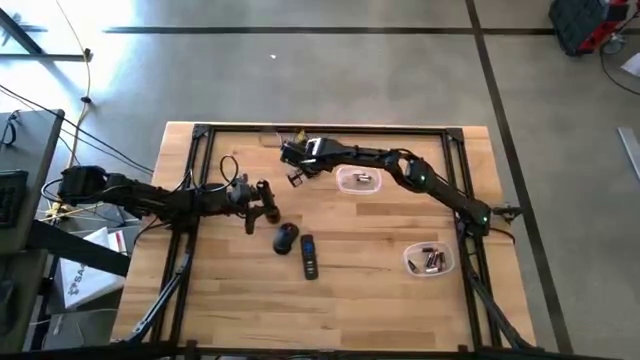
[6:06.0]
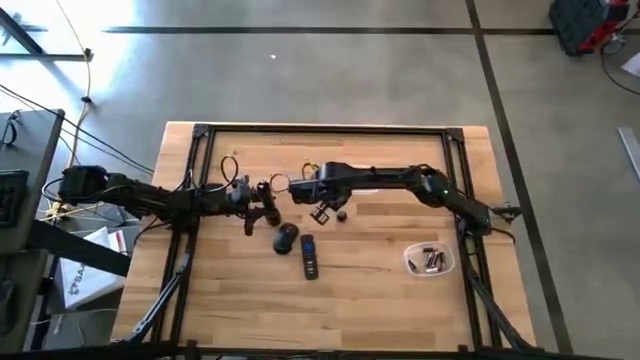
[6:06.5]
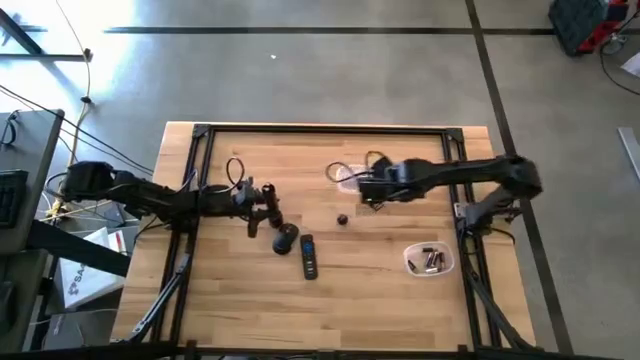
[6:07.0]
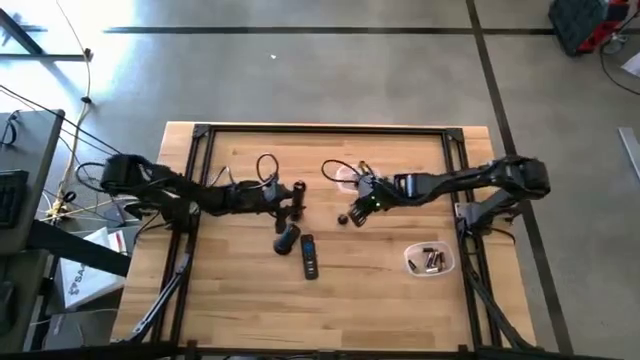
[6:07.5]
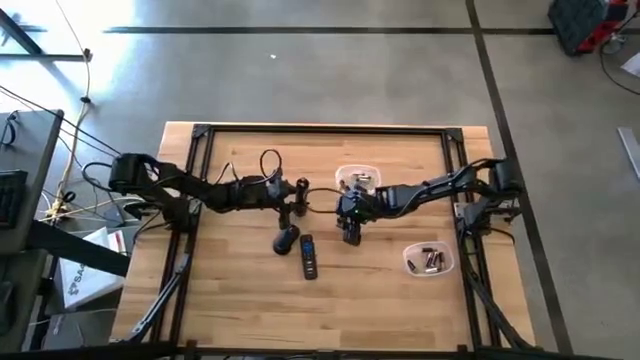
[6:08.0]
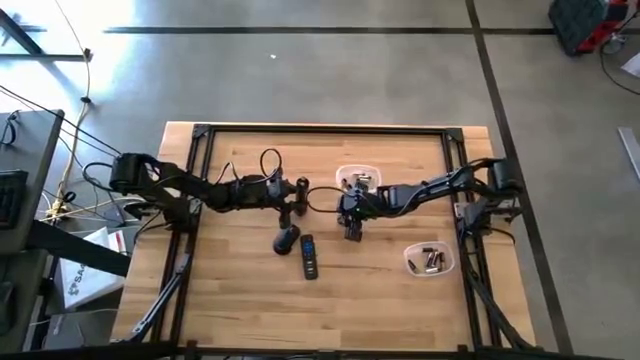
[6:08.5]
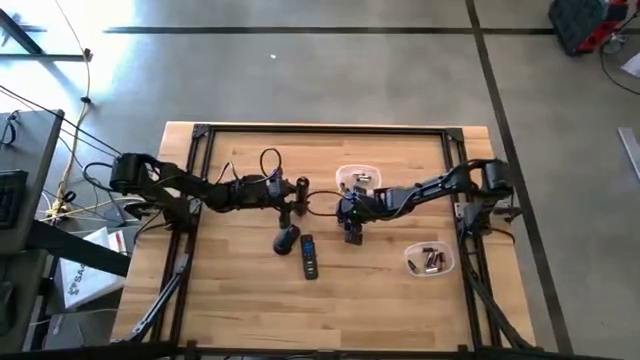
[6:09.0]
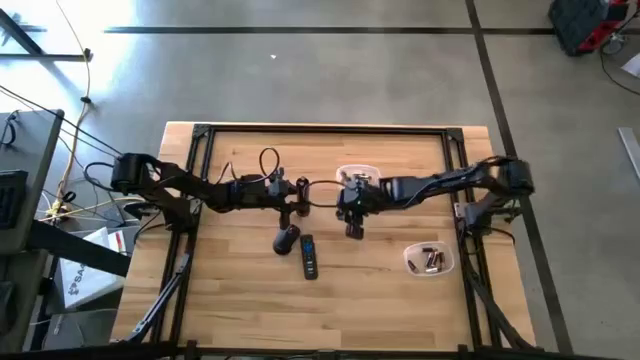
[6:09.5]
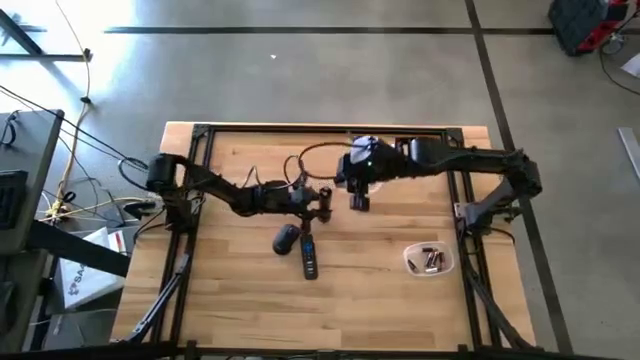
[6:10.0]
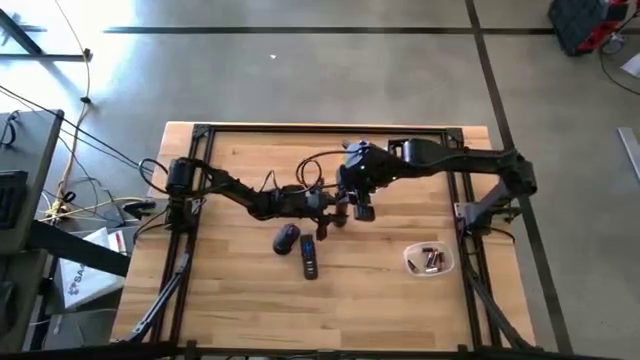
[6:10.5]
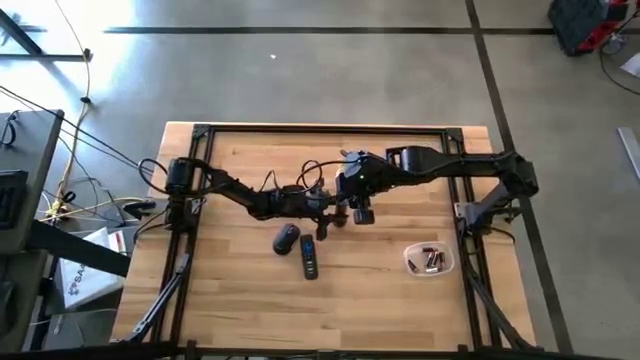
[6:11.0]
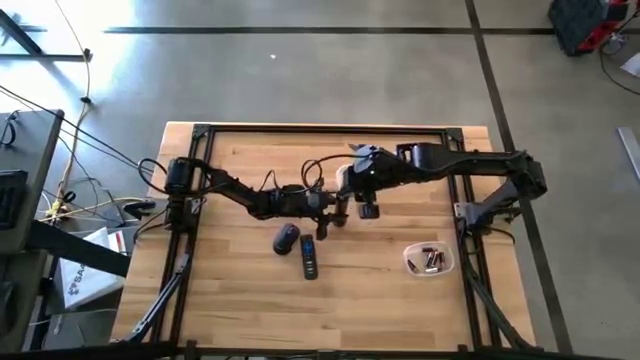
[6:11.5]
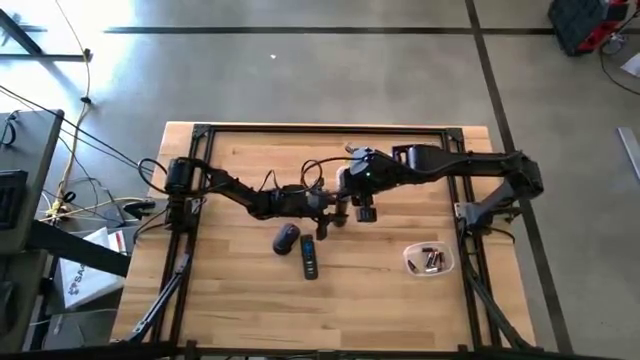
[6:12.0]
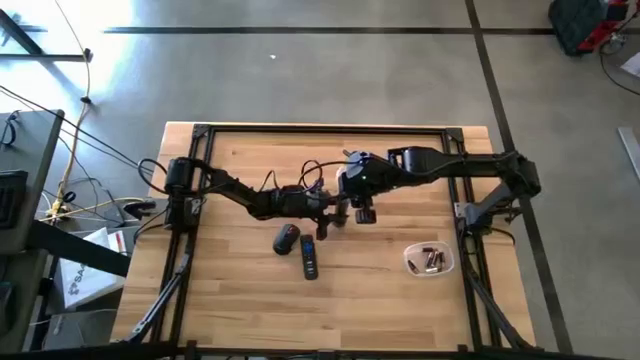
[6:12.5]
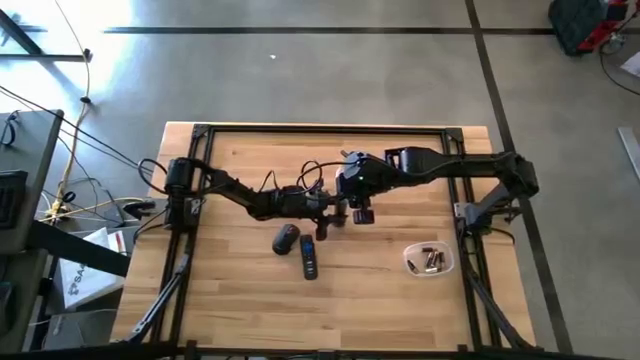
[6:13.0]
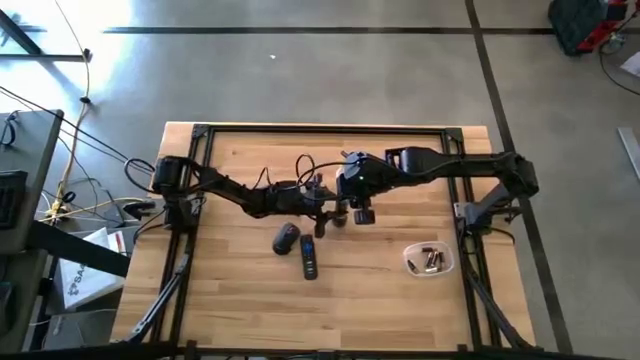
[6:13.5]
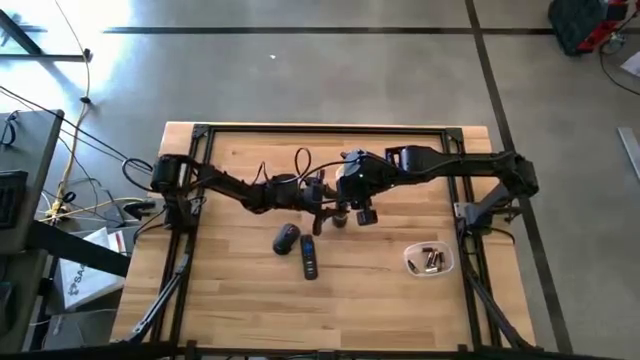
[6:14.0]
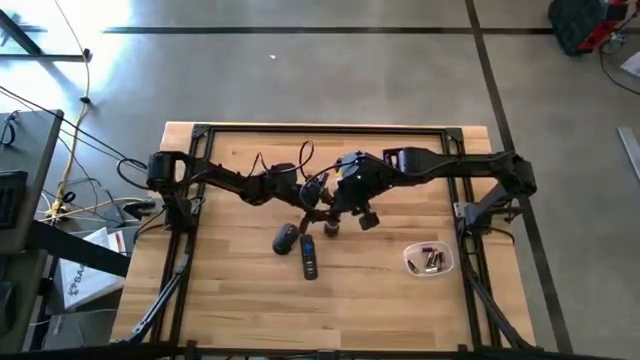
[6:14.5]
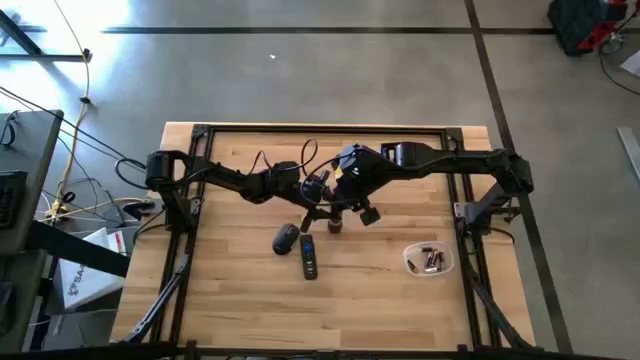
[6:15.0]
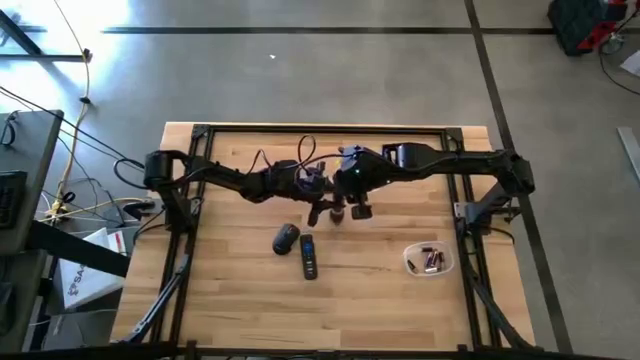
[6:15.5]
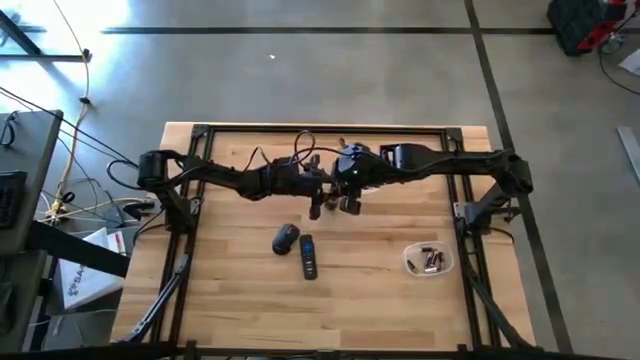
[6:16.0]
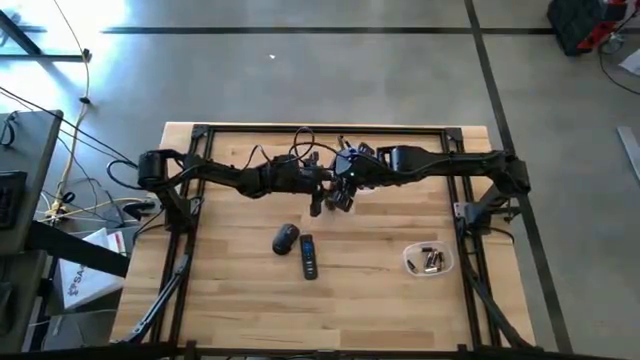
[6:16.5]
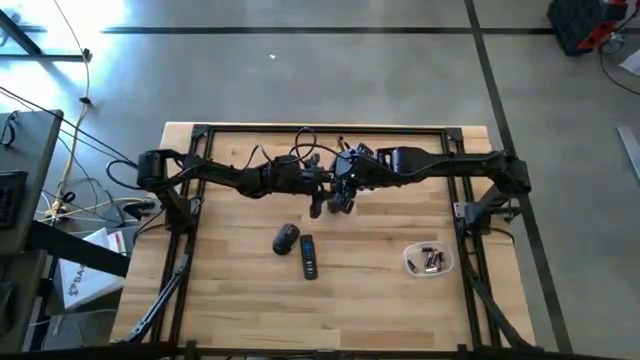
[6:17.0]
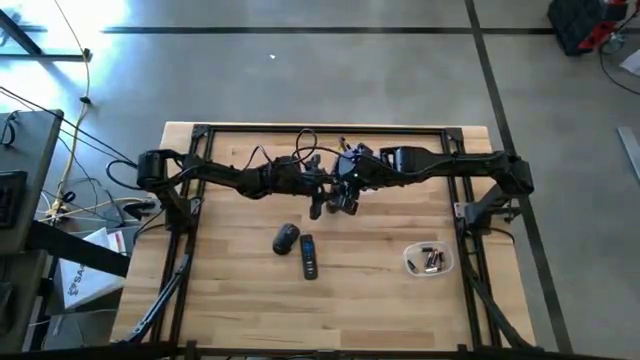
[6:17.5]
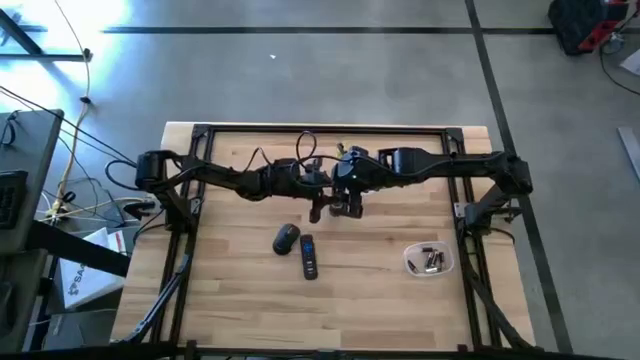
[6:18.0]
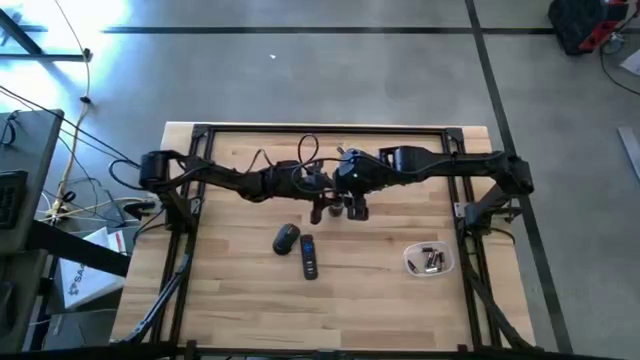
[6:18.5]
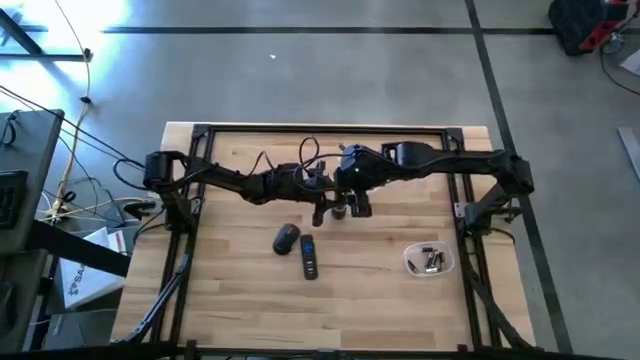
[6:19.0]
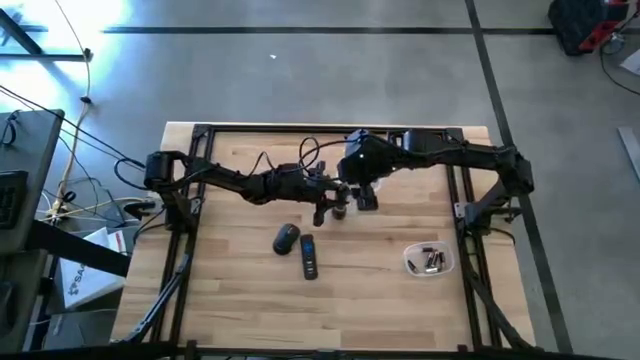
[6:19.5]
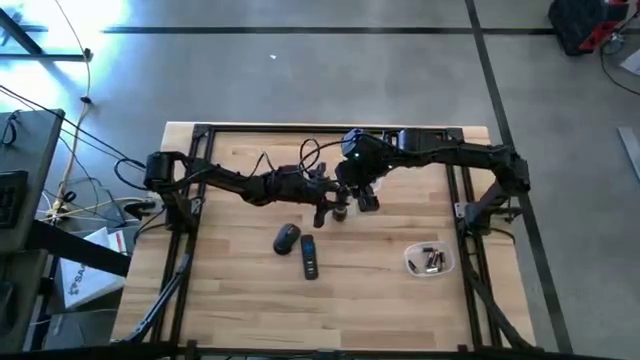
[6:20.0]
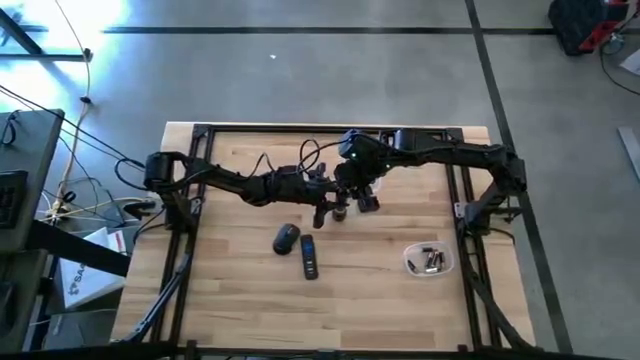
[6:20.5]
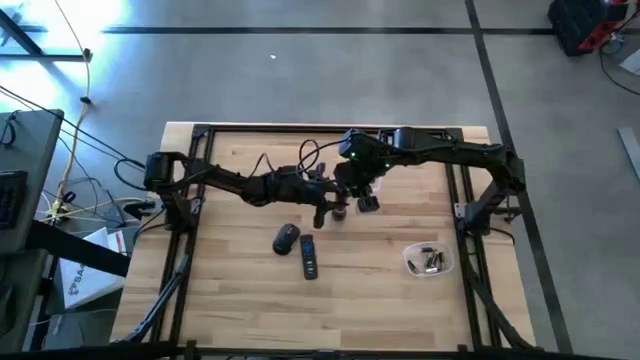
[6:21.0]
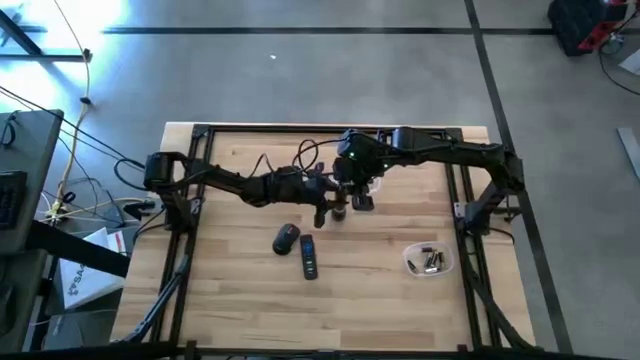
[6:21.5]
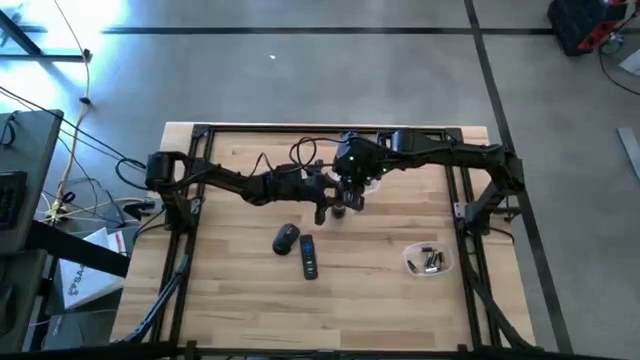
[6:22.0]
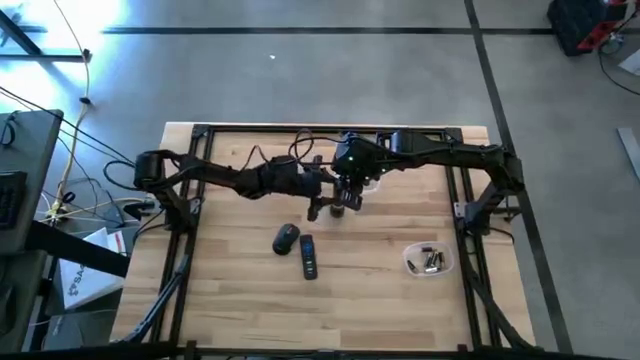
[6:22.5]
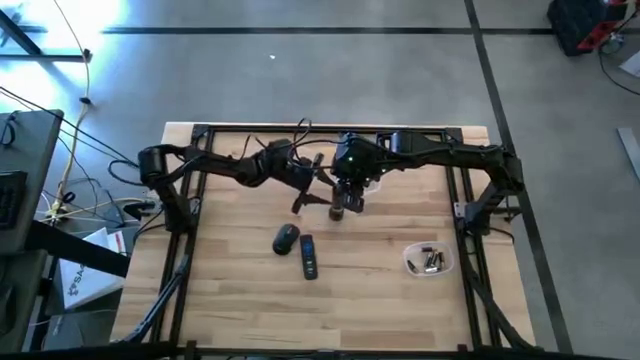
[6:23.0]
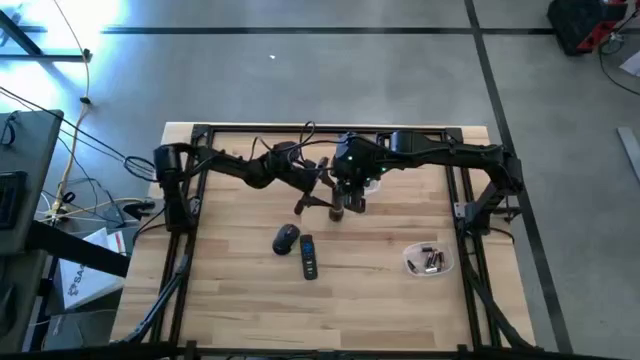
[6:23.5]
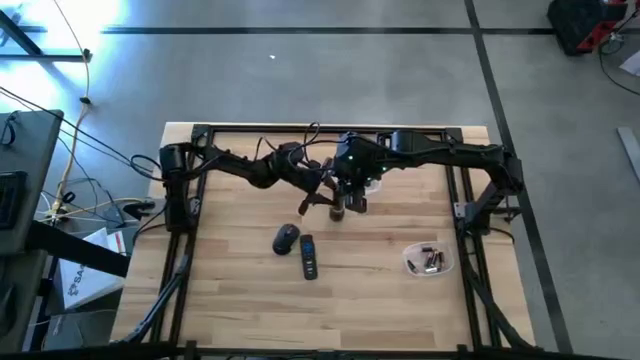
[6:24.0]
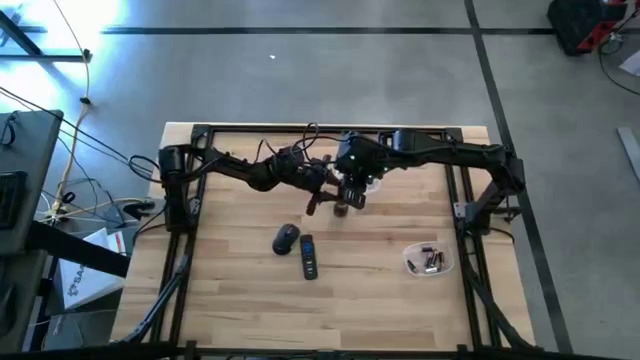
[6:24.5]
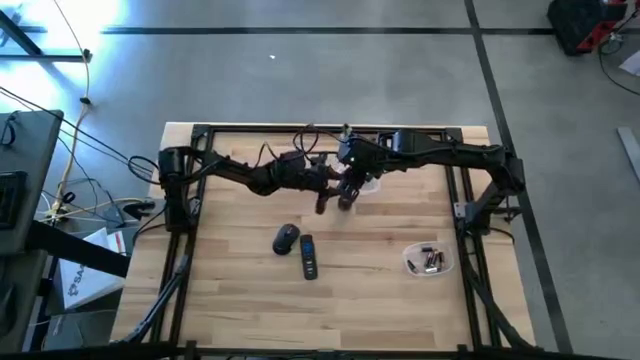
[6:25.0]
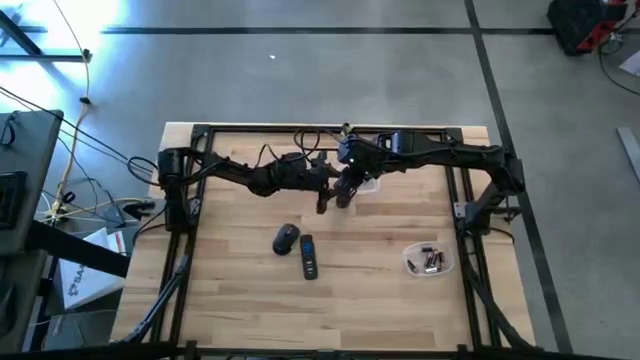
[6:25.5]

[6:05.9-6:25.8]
Task: Insert battery
Close the flashlight using its cover
